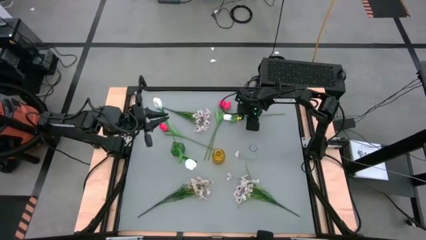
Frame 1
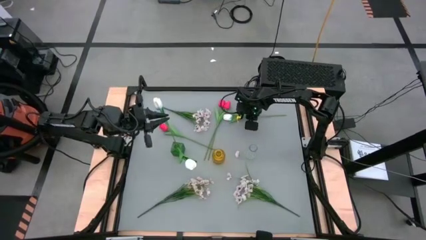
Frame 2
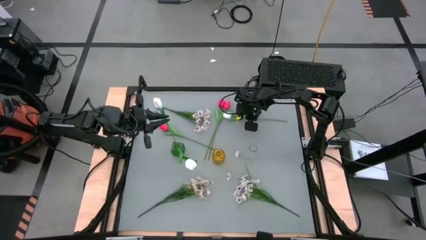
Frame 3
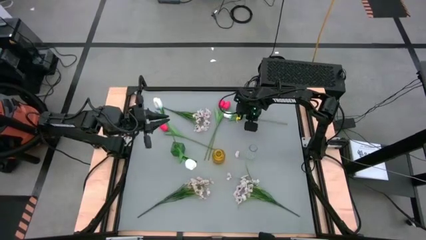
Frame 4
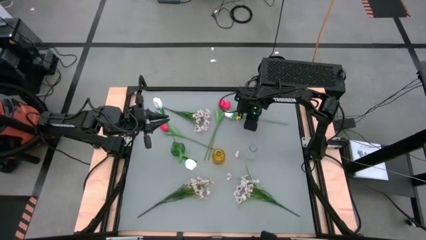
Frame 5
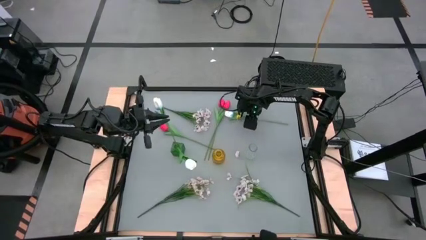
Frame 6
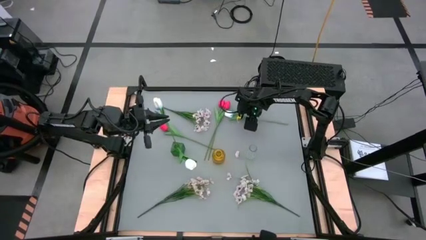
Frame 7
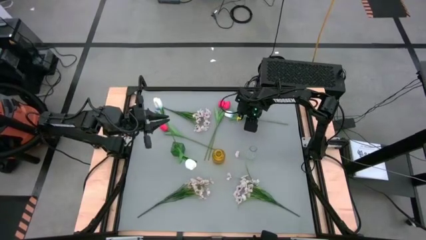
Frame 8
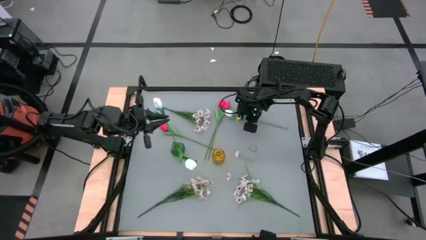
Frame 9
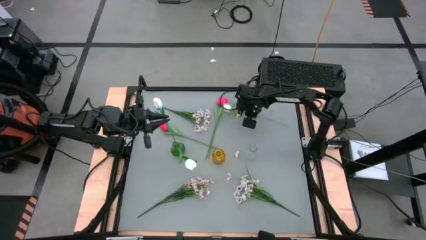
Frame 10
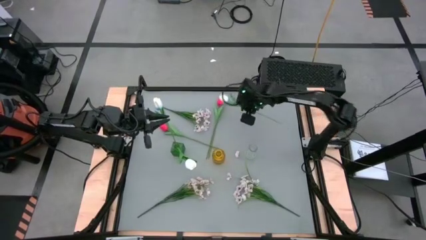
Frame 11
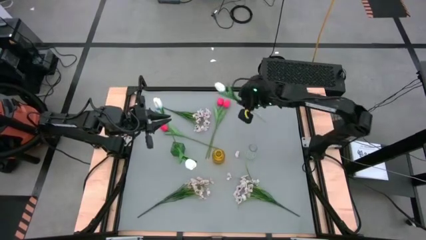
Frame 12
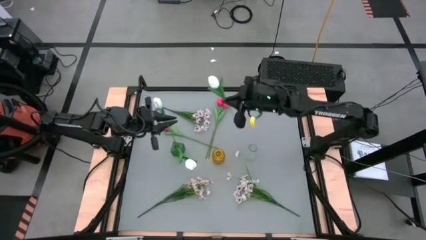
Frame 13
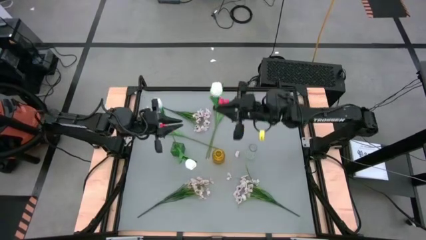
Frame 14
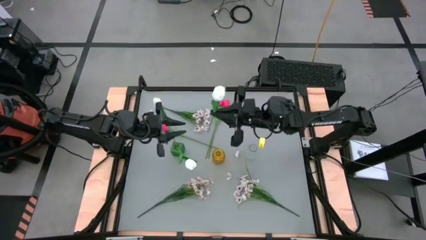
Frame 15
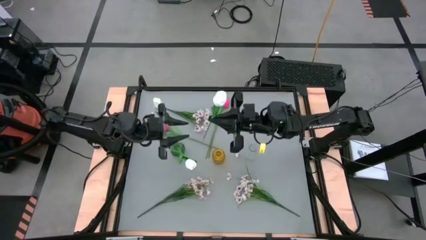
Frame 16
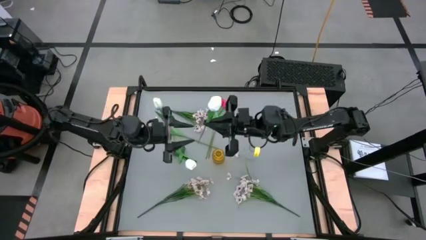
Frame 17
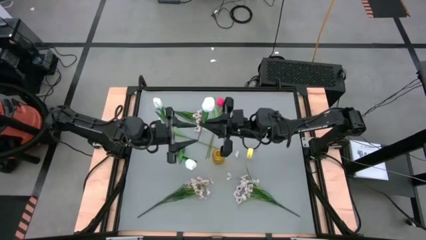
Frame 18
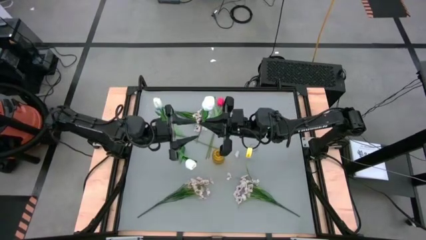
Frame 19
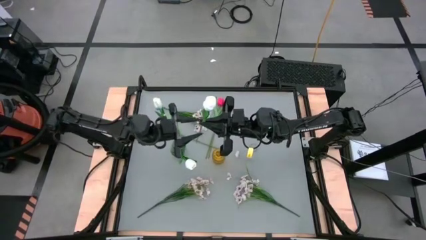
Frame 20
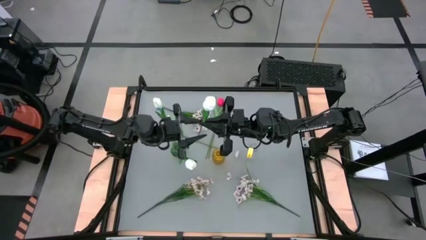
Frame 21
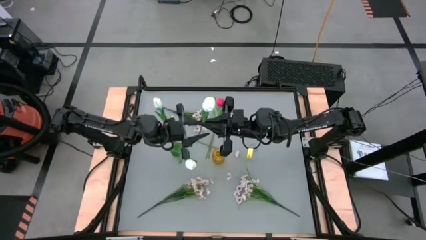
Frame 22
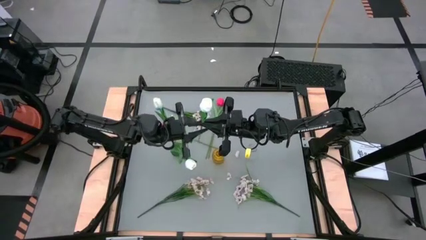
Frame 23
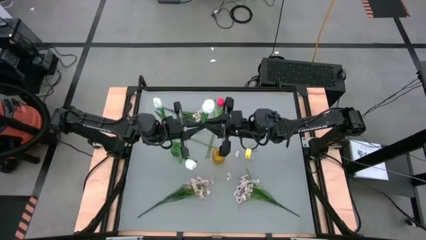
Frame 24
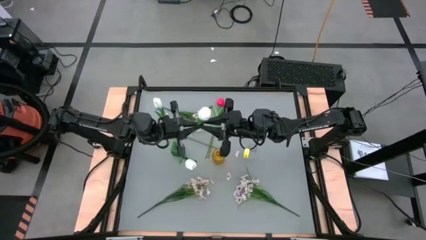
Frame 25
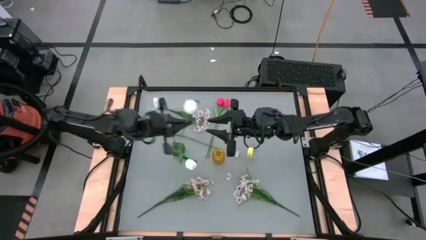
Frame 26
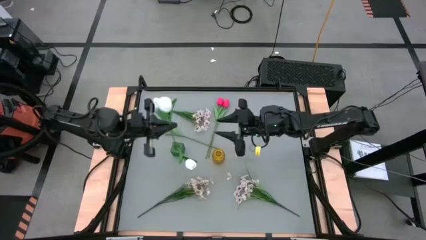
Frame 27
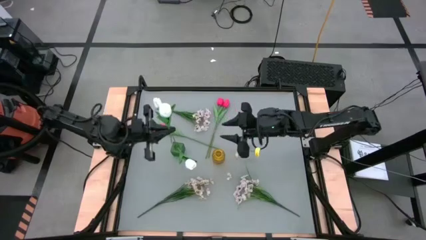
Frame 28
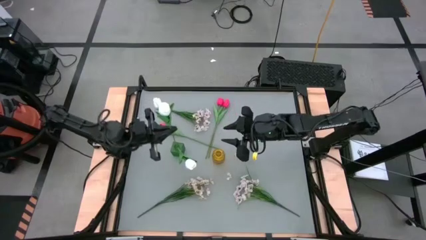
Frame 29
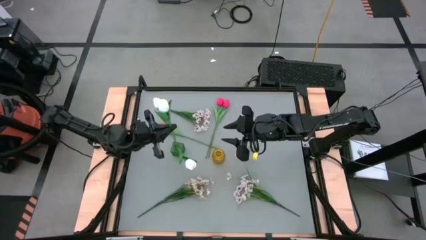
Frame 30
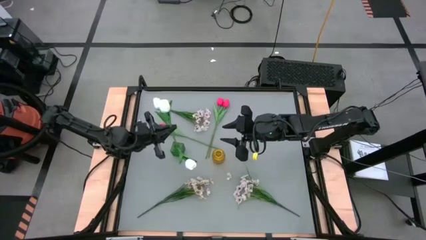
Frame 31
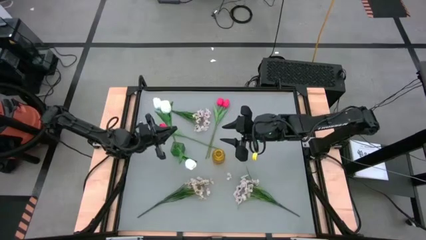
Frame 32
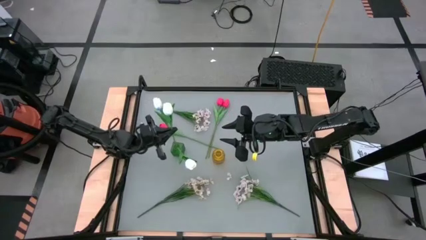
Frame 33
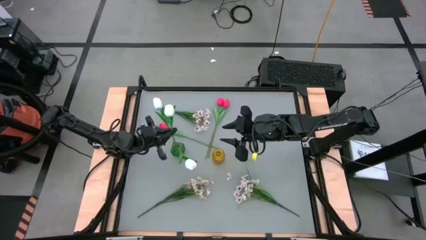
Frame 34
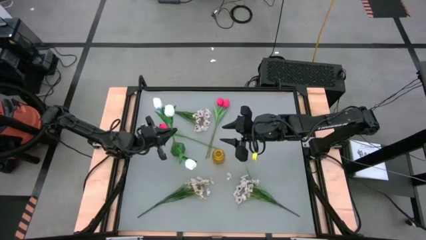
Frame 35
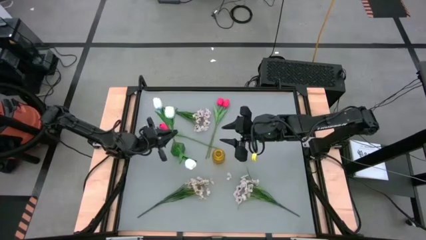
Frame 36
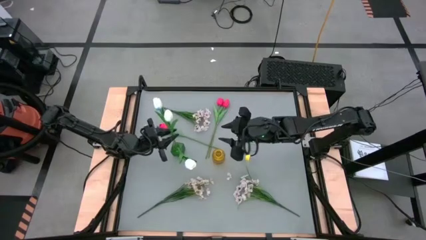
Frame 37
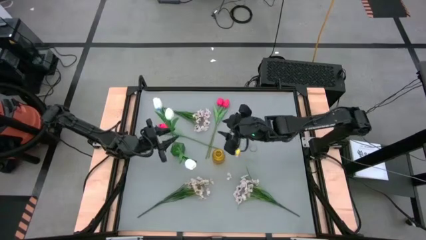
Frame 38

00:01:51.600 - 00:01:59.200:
Task: Sort flowers into vase by color
Put the white flower into the green vase

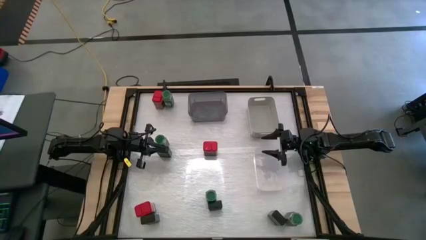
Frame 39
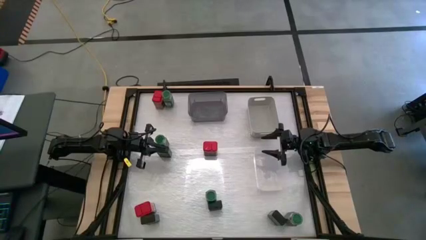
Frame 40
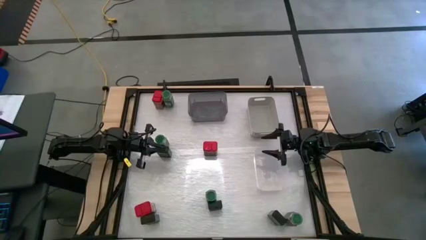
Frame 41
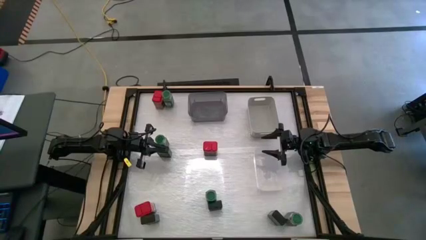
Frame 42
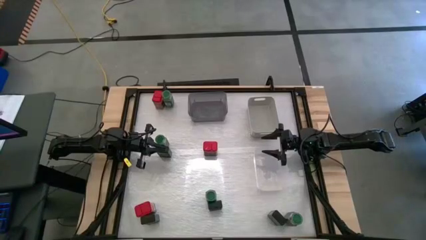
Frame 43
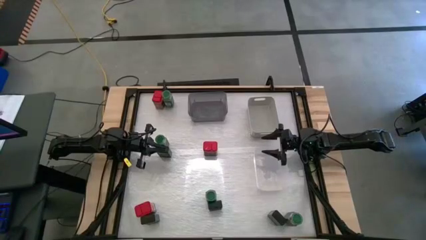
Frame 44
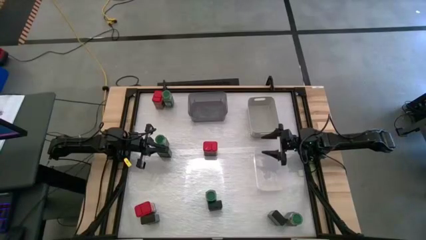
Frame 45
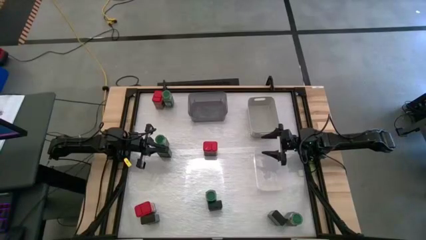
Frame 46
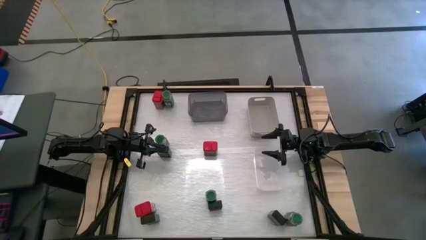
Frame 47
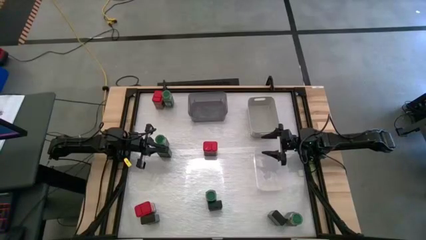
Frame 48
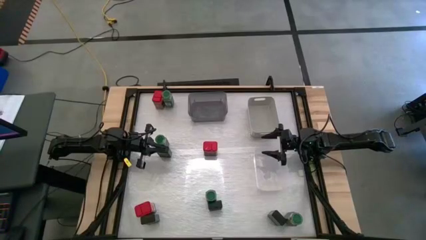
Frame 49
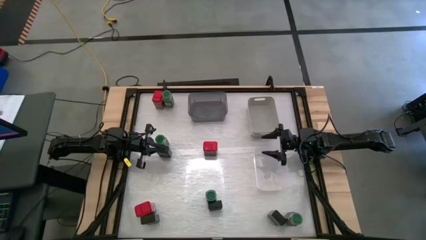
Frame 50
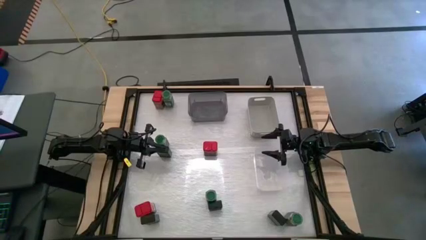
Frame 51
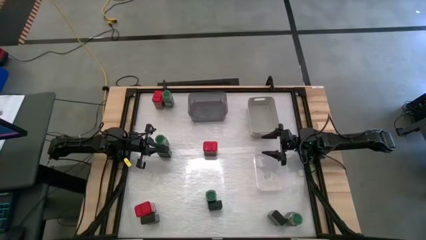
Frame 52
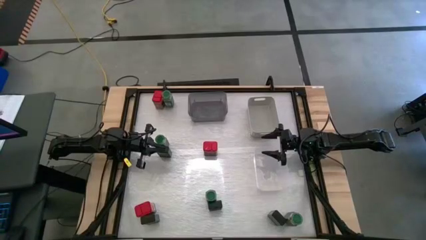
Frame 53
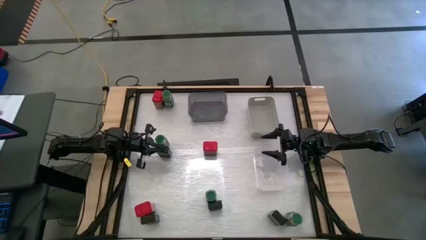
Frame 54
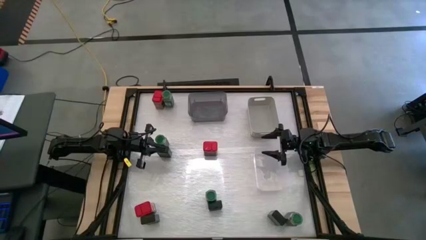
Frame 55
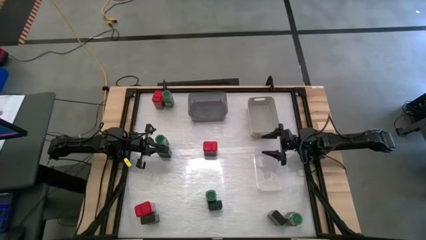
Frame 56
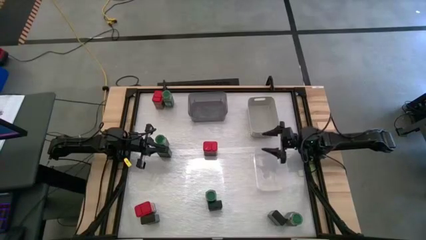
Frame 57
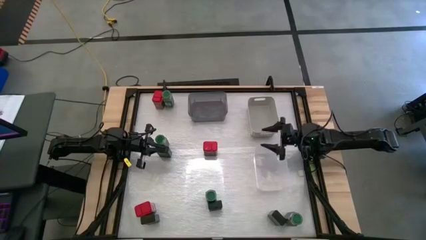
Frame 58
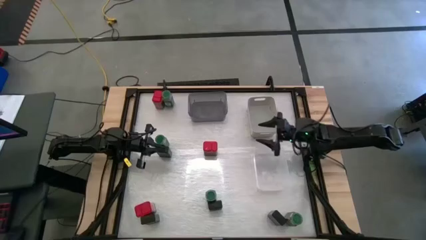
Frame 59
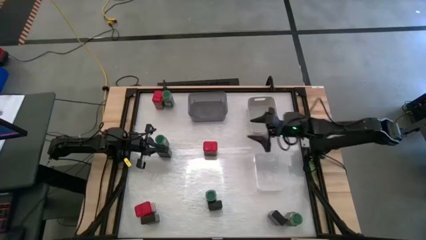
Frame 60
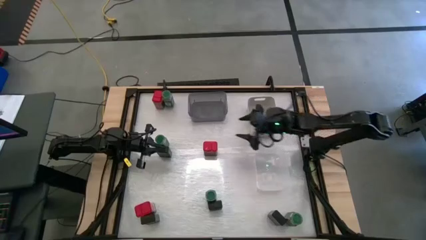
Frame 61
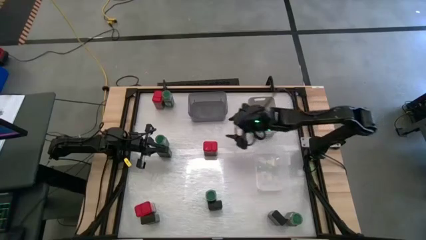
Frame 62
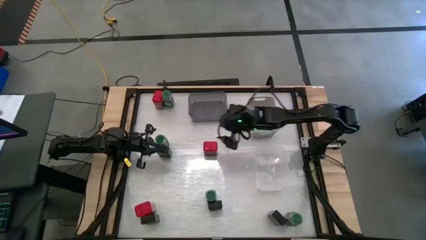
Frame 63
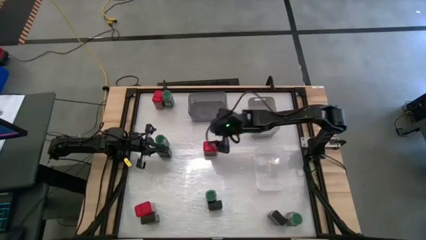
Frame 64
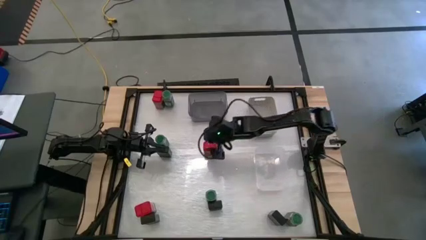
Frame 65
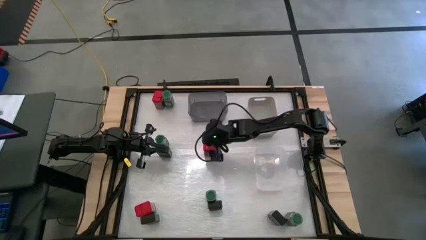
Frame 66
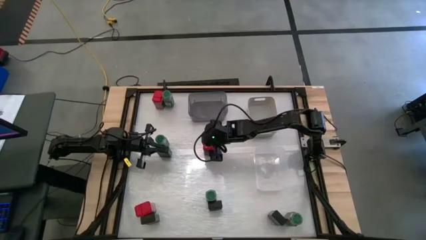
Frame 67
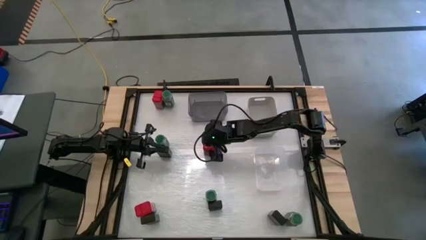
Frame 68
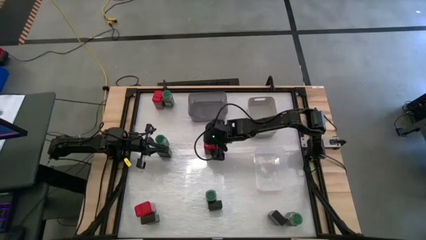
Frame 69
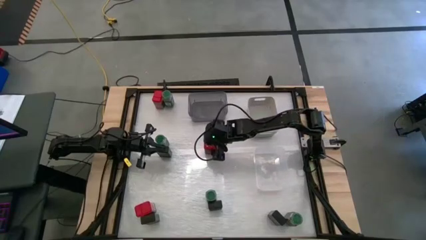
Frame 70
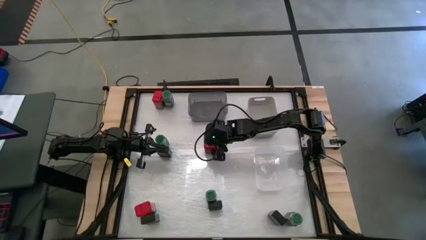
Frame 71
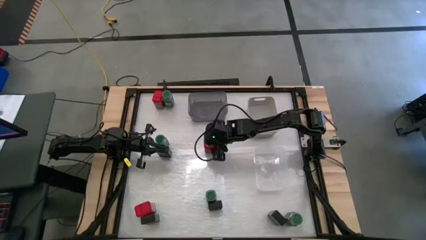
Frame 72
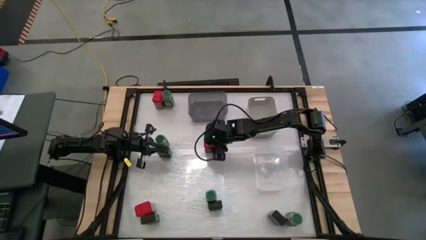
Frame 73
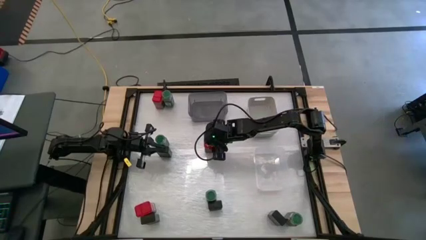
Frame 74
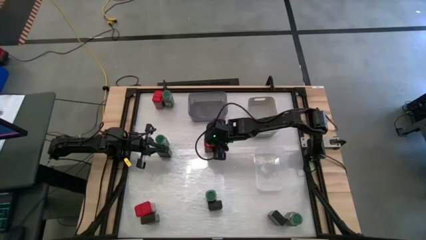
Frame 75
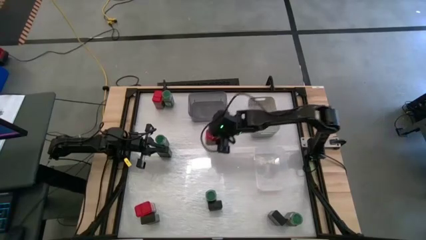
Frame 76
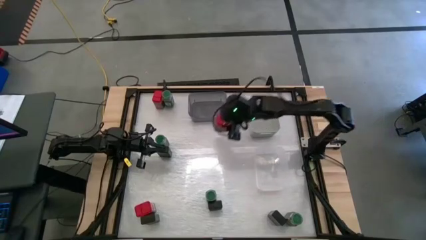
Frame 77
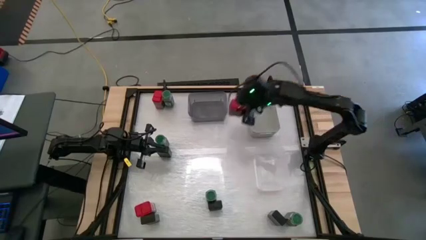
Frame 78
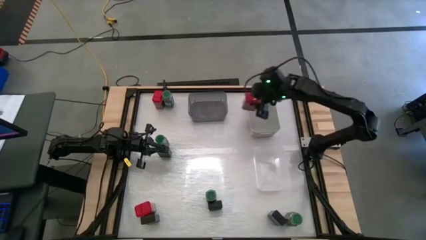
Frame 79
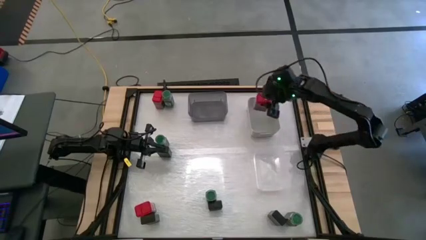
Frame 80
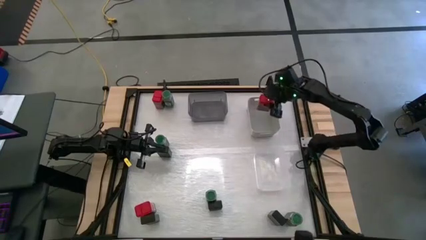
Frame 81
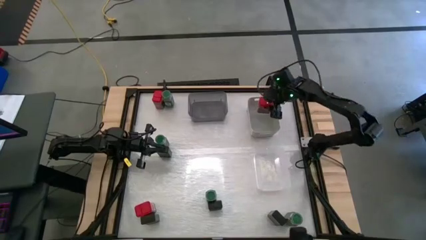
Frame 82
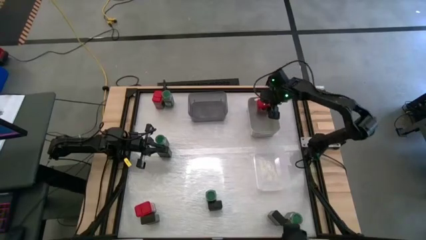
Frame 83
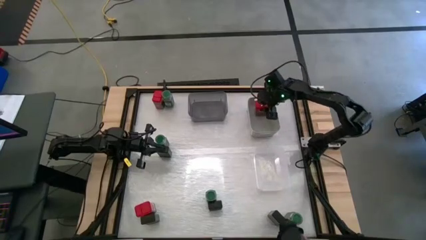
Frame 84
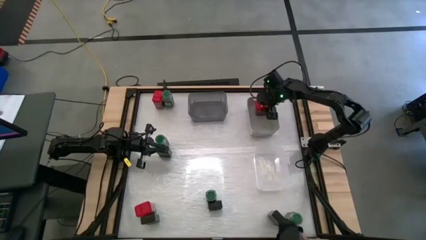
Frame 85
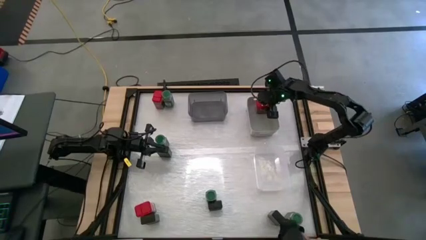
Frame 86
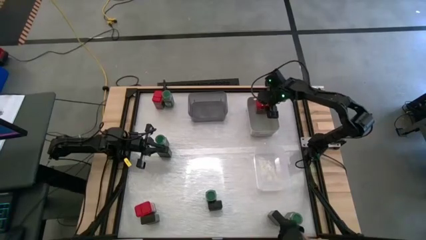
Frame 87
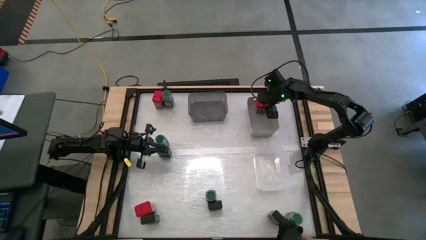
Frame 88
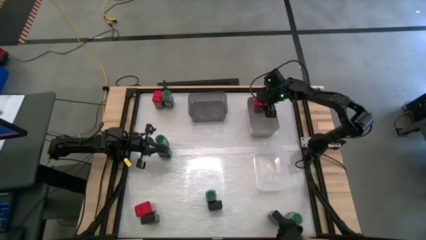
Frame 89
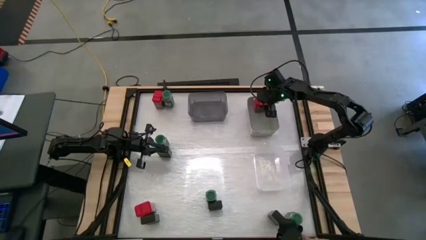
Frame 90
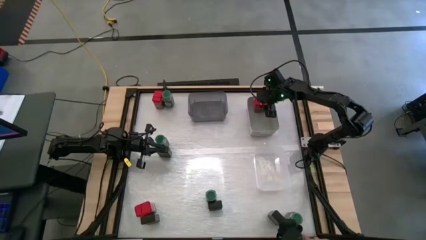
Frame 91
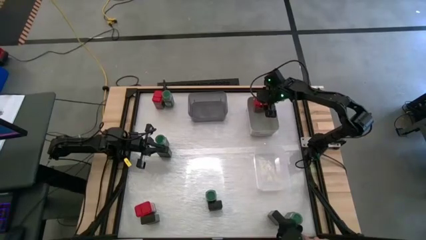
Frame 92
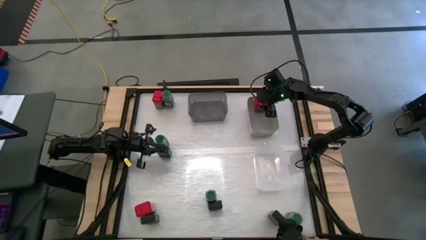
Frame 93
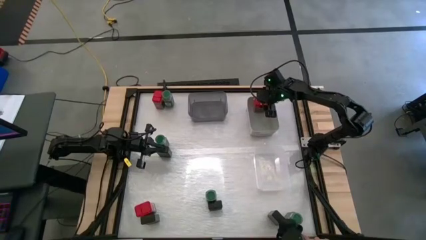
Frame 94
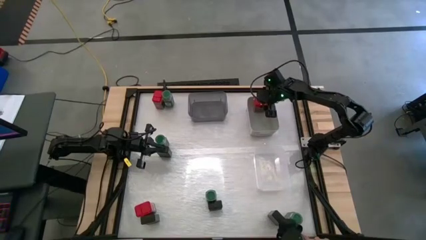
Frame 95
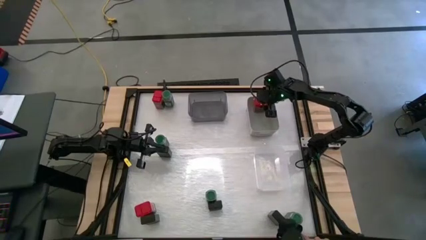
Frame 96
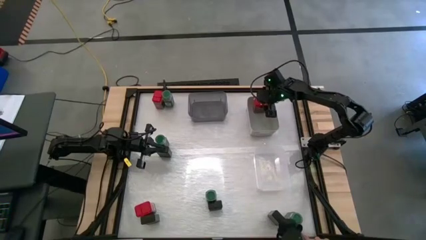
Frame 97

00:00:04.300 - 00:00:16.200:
Task: Sort spices by type
Put the center red seasoning can into the gray bin
